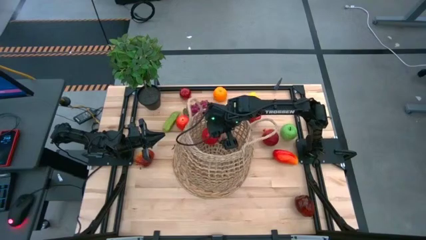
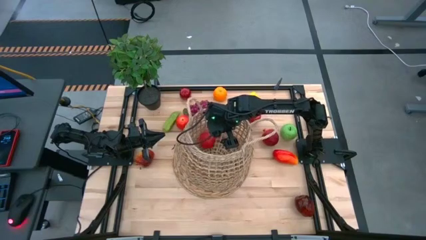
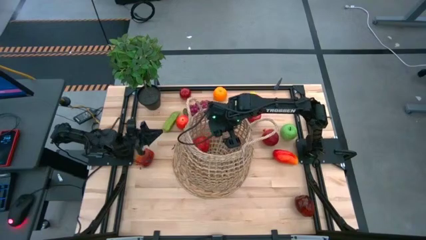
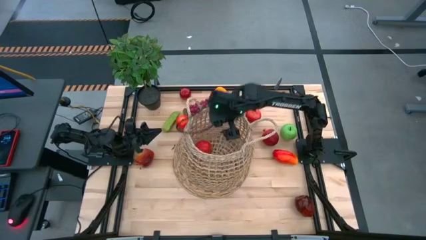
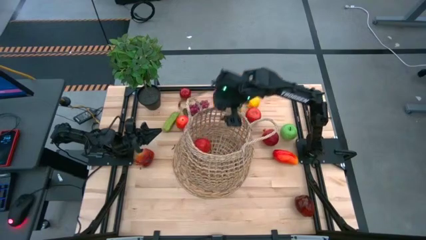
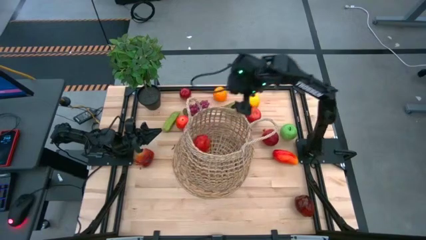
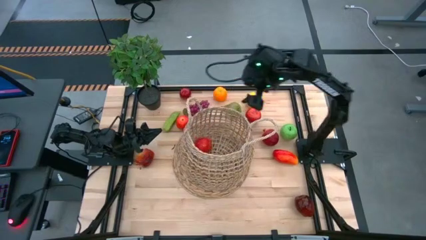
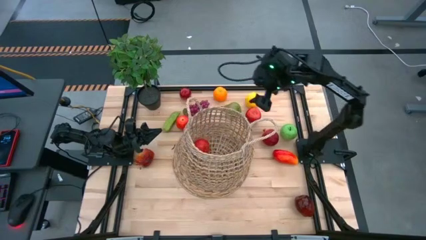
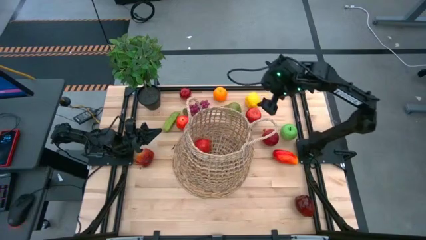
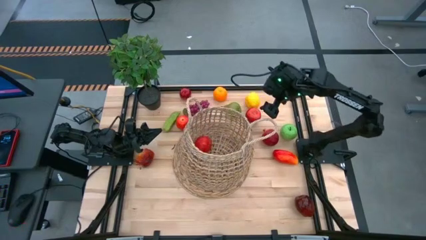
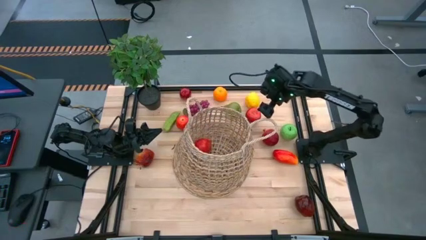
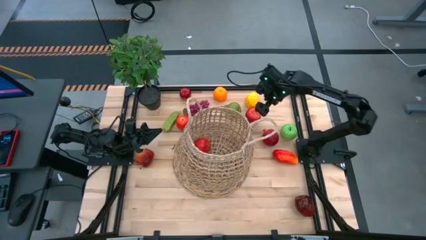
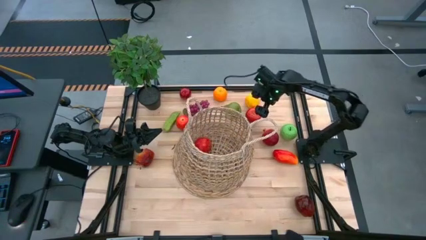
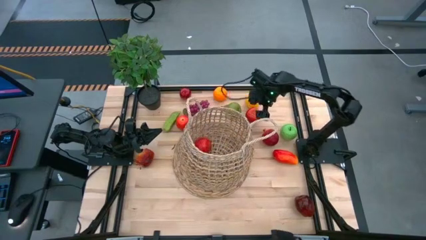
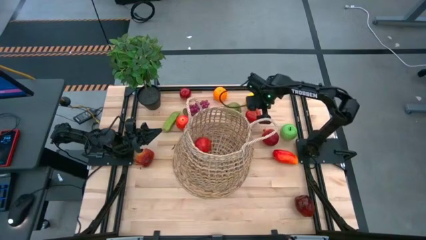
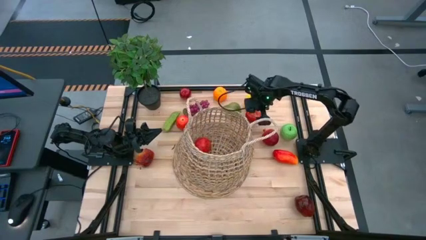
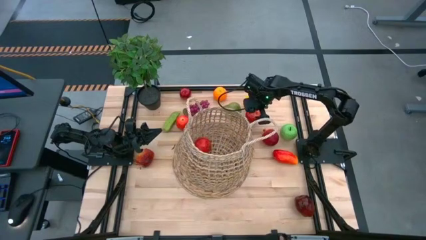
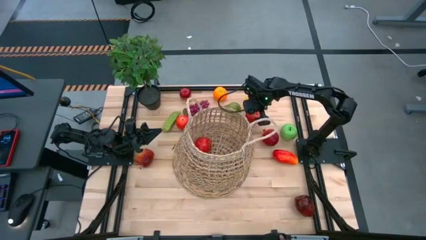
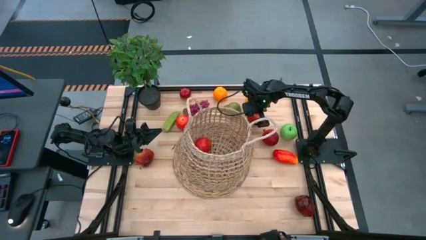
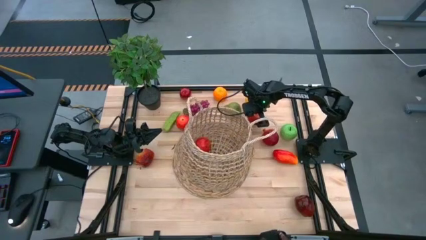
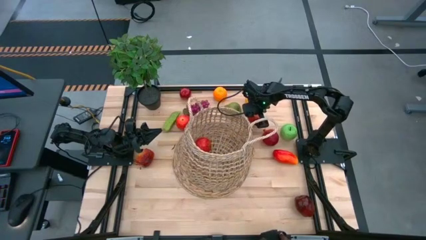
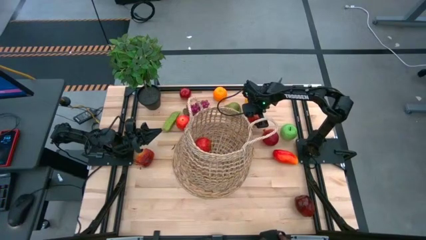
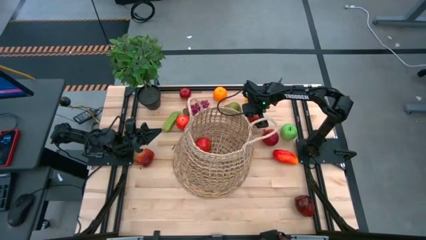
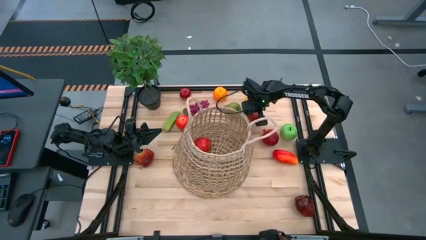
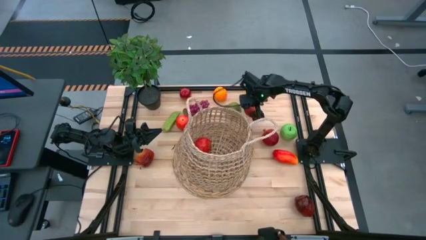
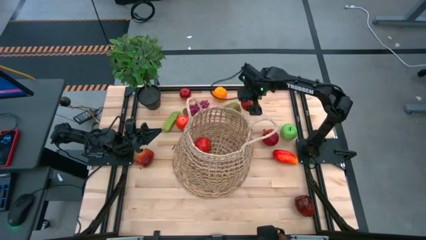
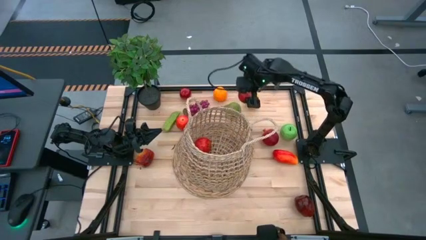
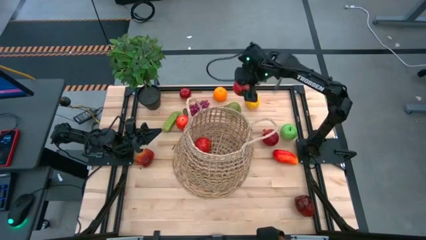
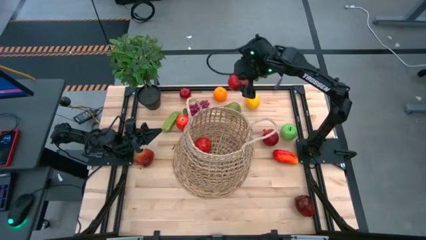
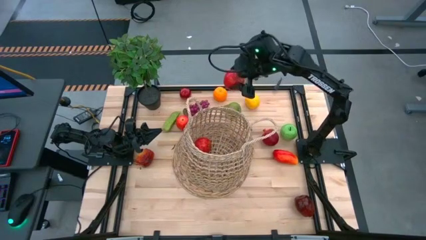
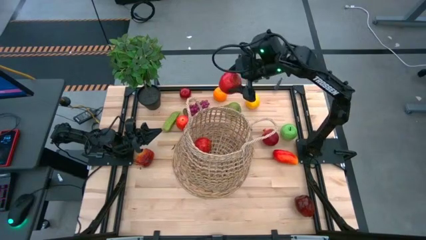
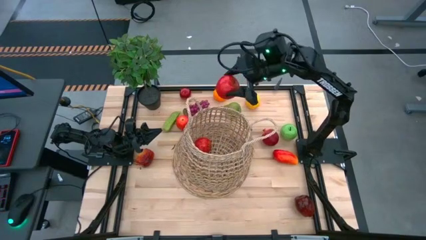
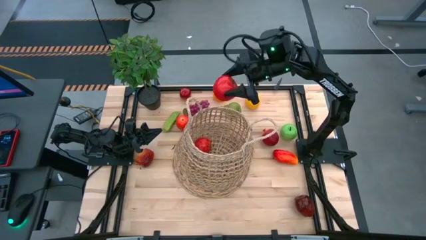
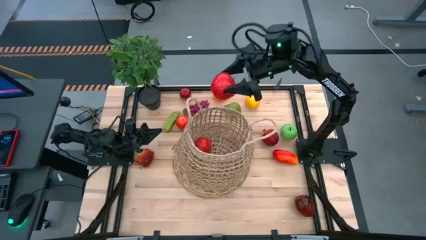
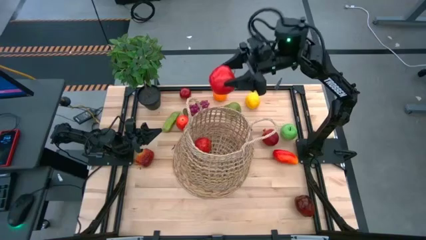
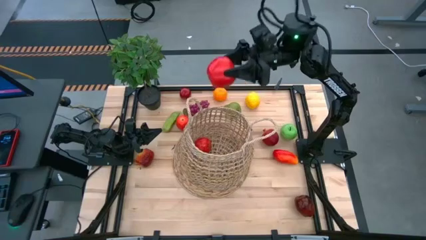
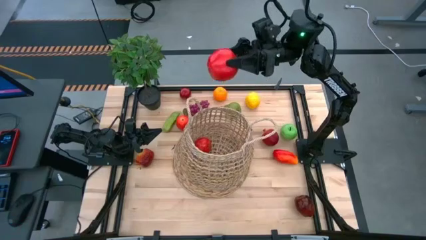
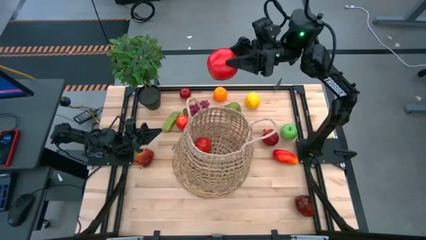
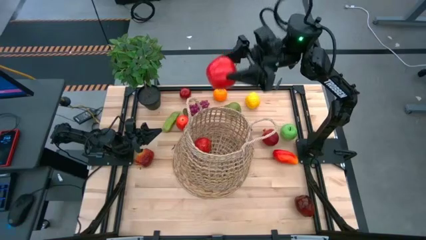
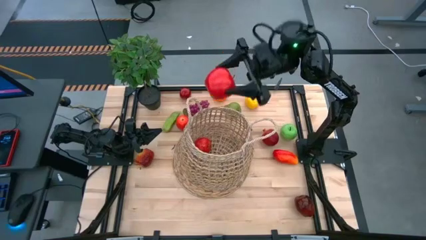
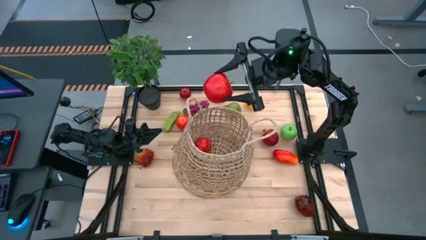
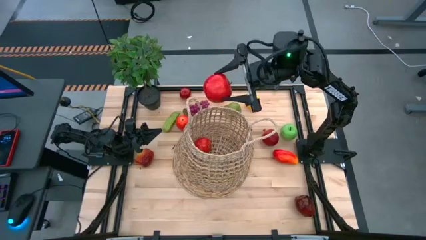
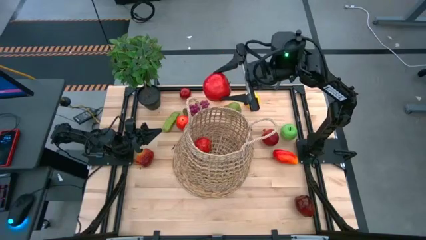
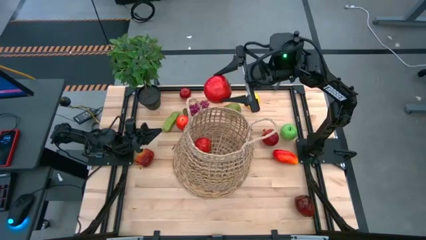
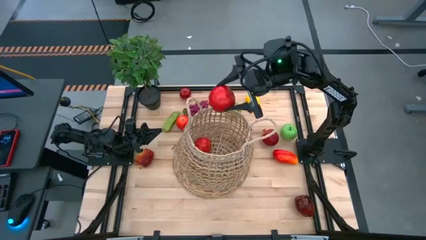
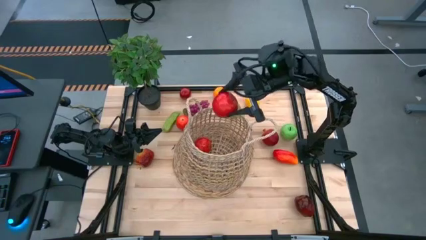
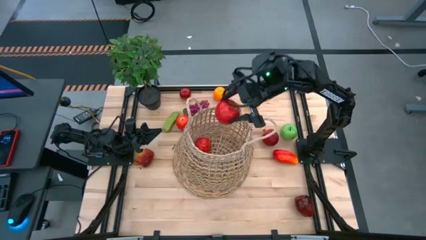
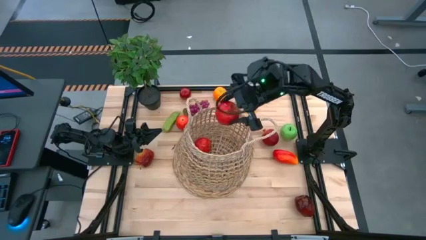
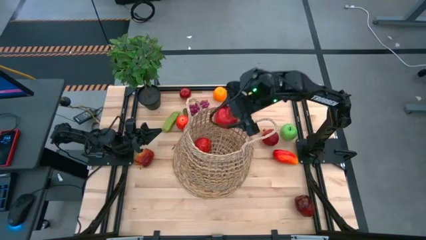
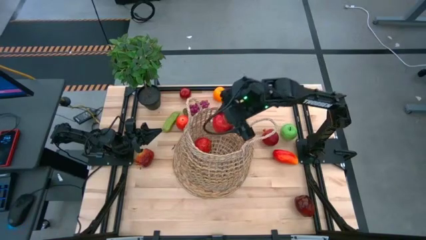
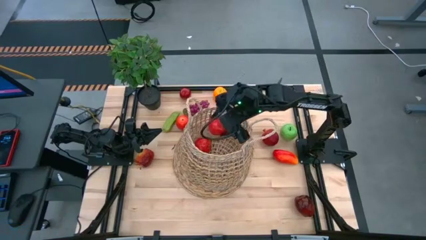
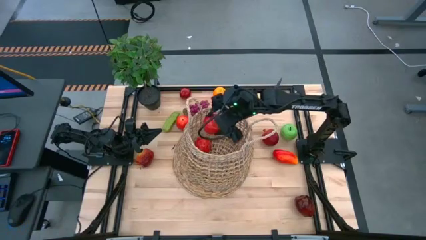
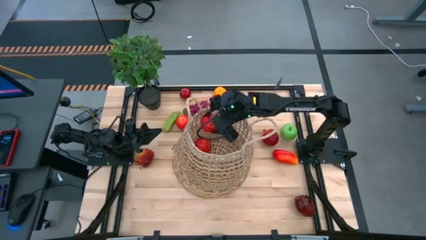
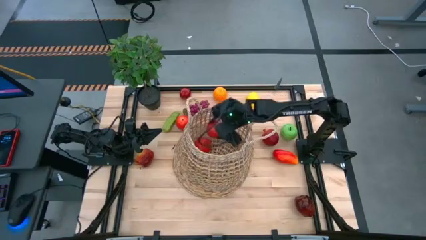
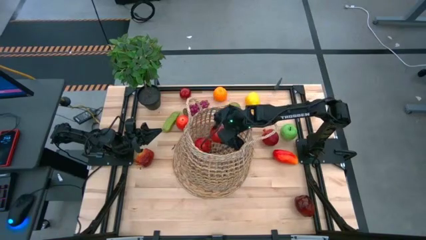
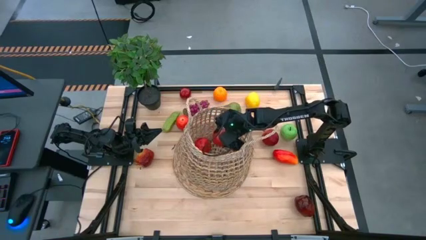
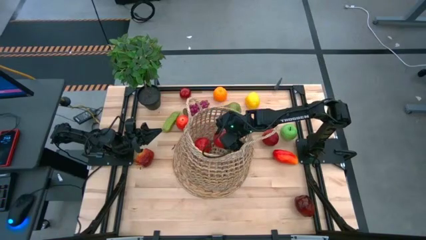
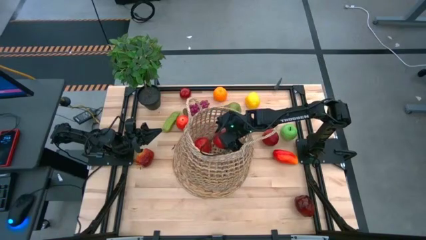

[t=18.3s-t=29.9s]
Task: Build produce basket
Put the red apple into the brown basket

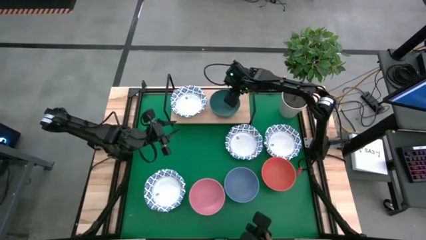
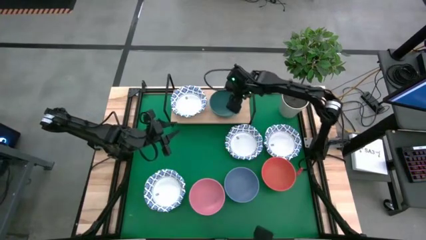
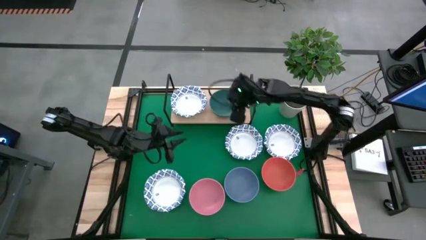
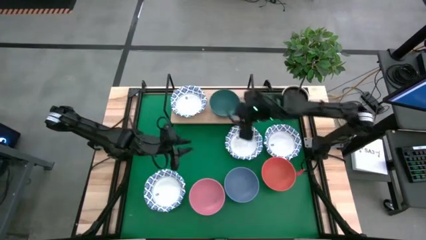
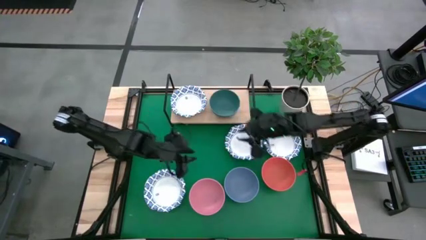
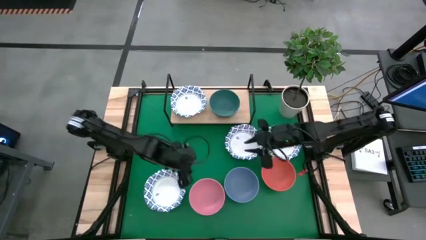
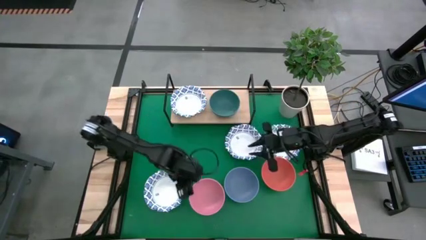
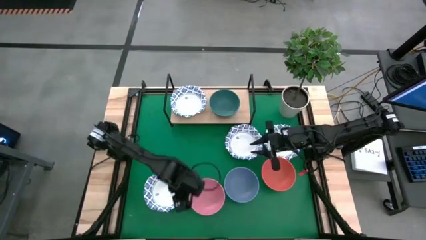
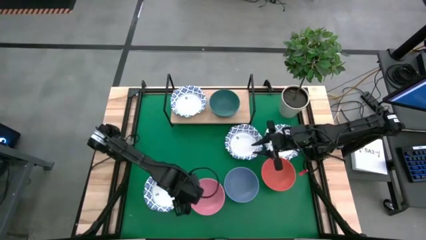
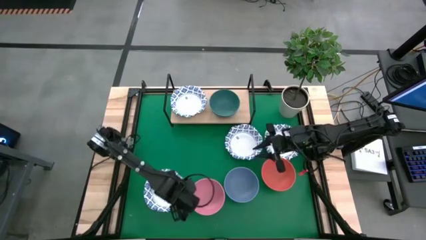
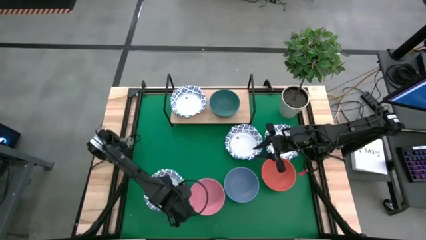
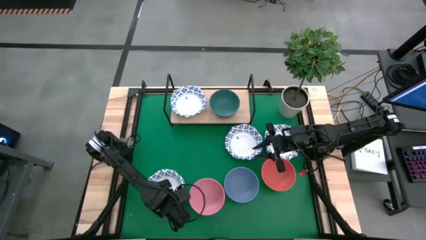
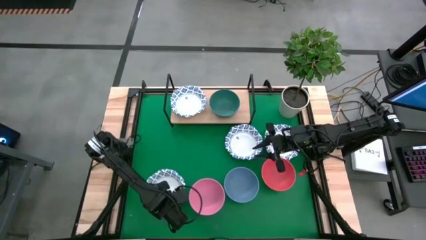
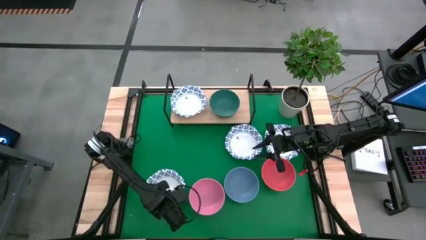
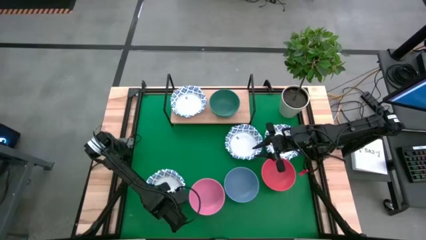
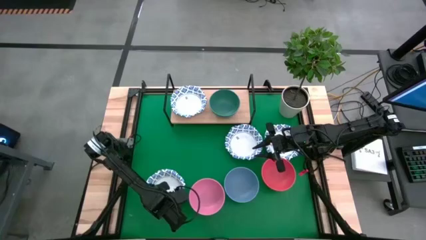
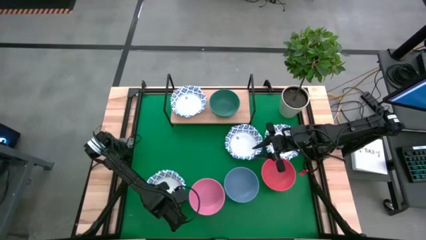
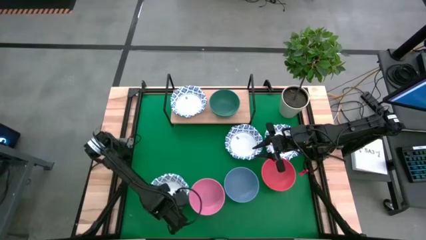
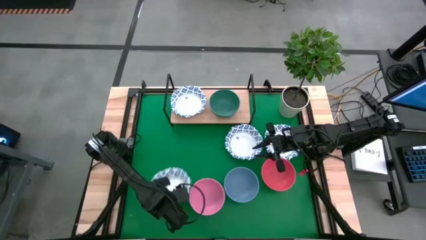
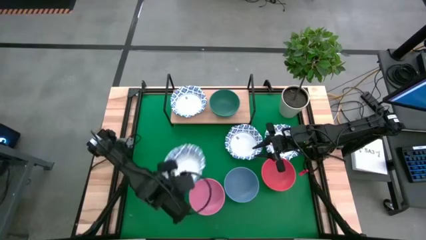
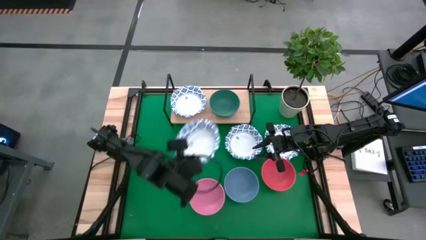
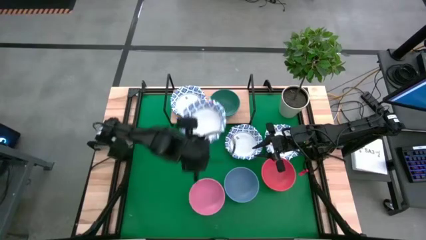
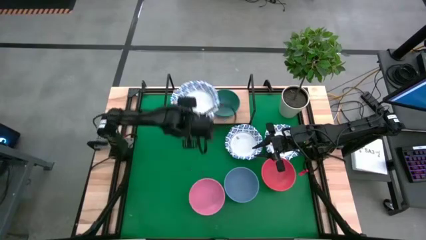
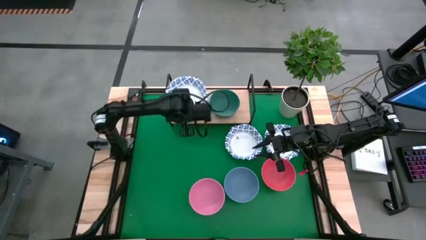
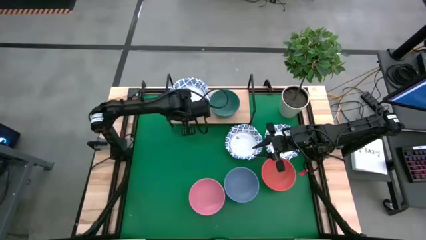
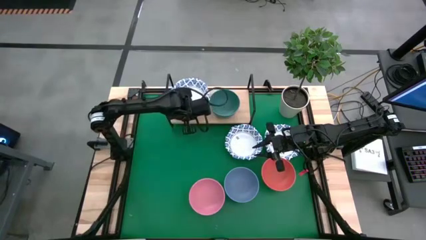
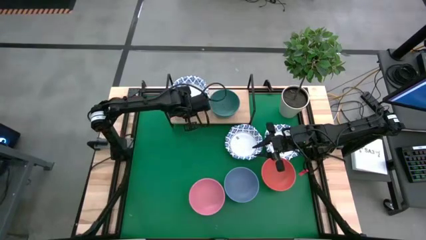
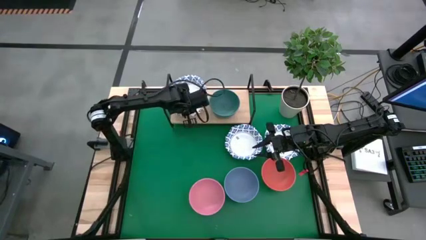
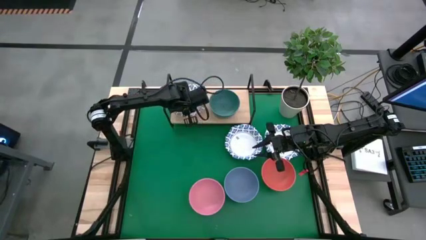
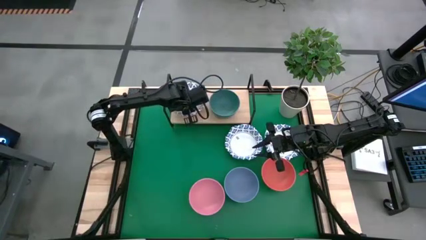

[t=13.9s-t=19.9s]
Task: Place and stack bowls onto a shelf
Stack the white patterned bowl on top of the white patterned bowl on the shelf
